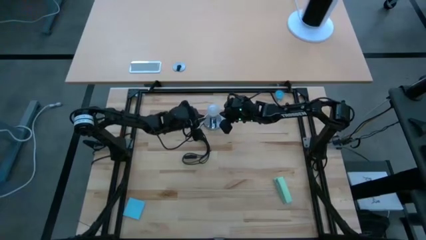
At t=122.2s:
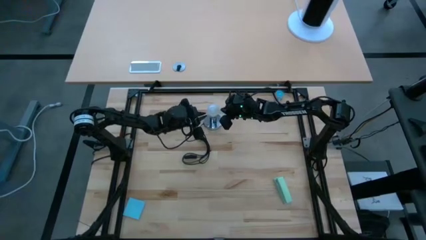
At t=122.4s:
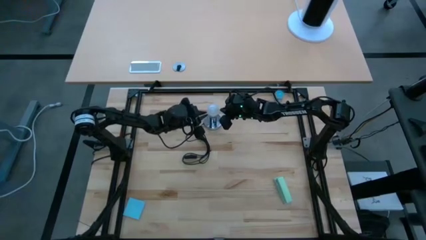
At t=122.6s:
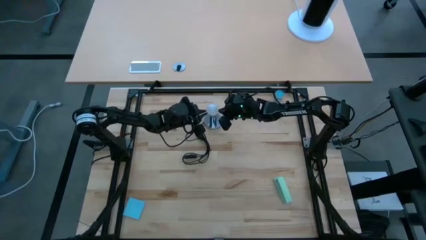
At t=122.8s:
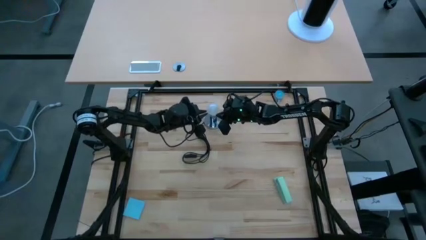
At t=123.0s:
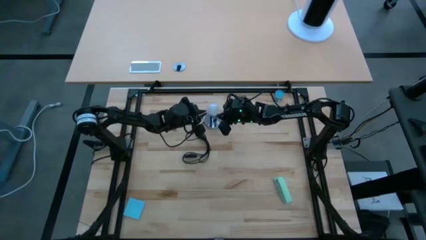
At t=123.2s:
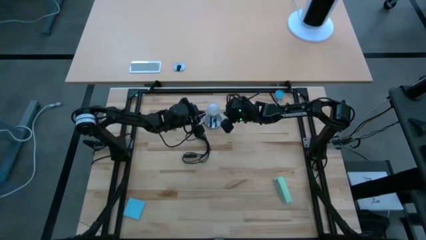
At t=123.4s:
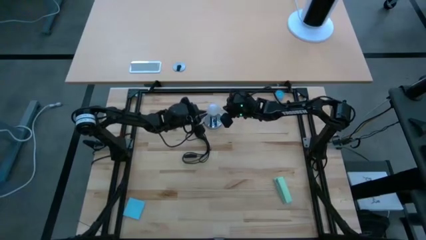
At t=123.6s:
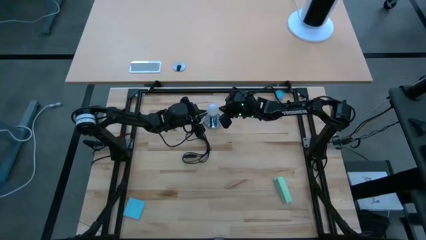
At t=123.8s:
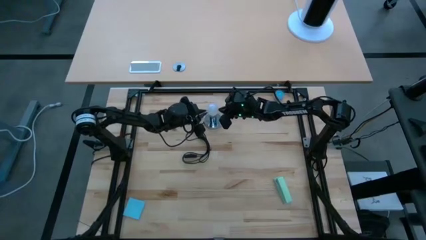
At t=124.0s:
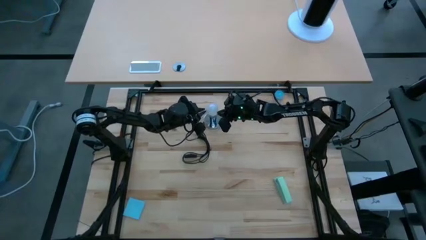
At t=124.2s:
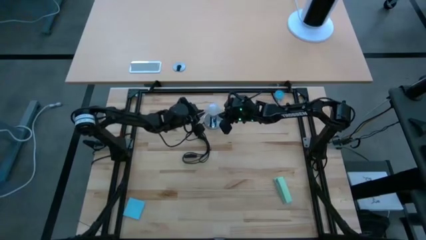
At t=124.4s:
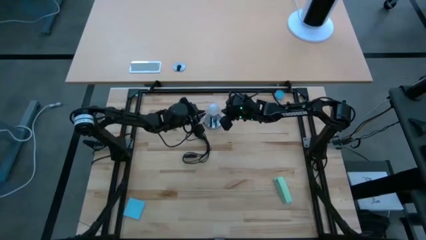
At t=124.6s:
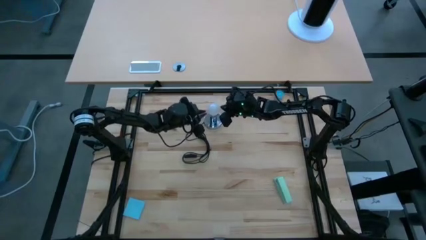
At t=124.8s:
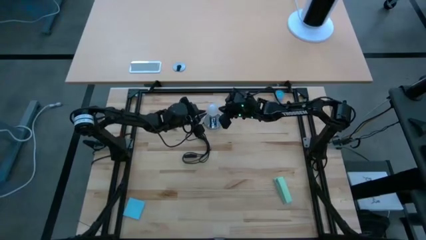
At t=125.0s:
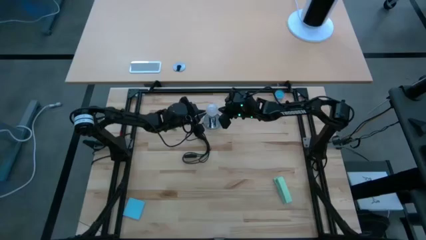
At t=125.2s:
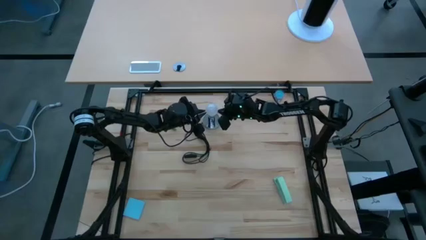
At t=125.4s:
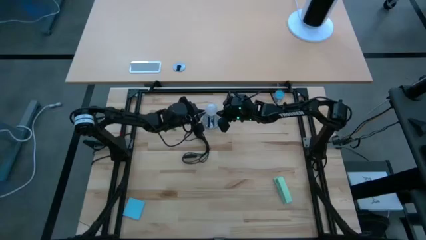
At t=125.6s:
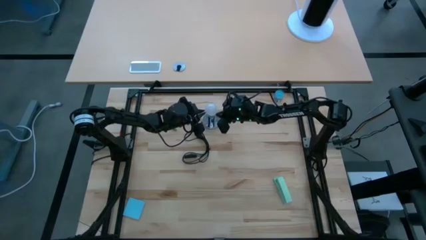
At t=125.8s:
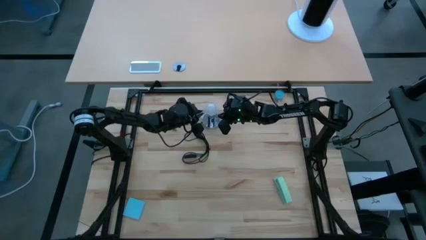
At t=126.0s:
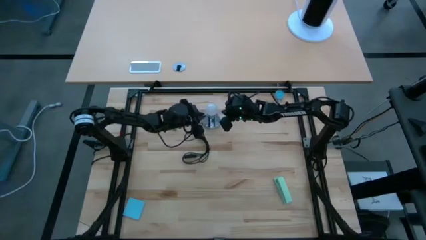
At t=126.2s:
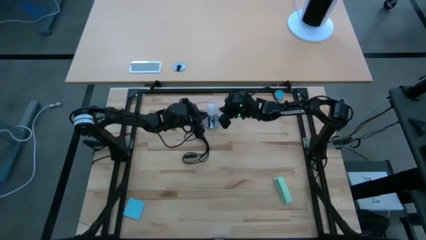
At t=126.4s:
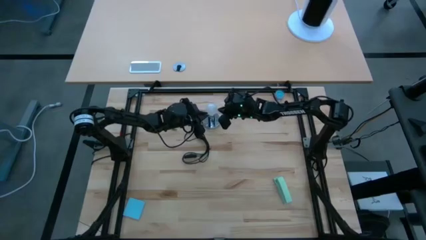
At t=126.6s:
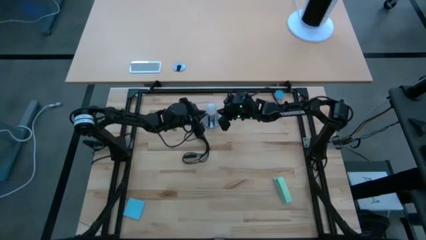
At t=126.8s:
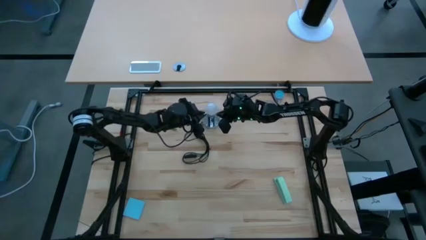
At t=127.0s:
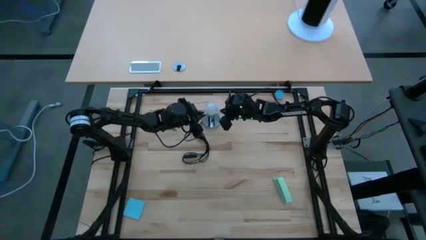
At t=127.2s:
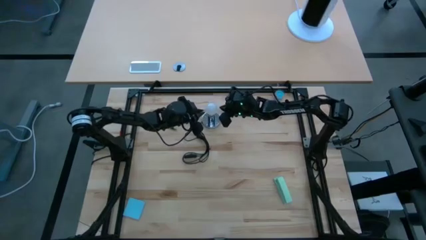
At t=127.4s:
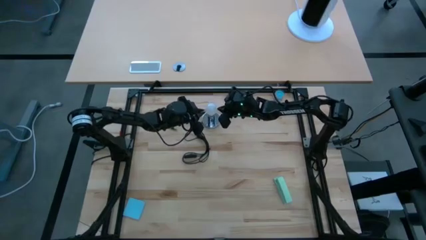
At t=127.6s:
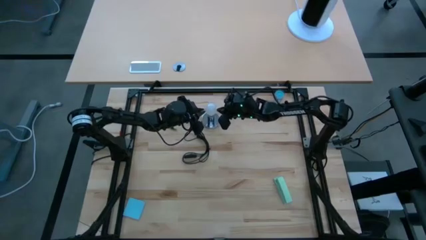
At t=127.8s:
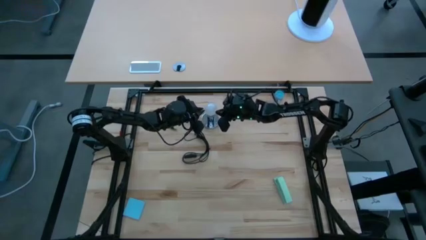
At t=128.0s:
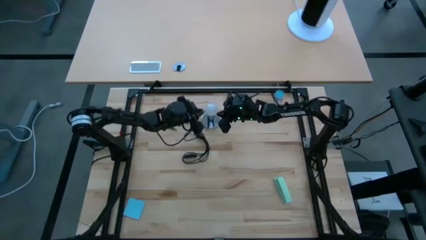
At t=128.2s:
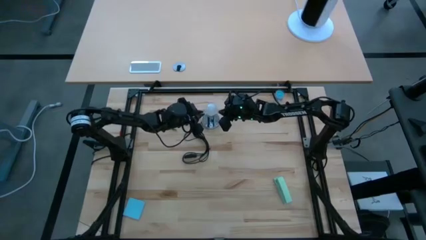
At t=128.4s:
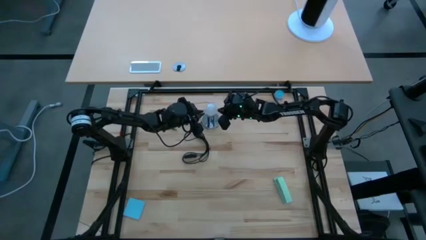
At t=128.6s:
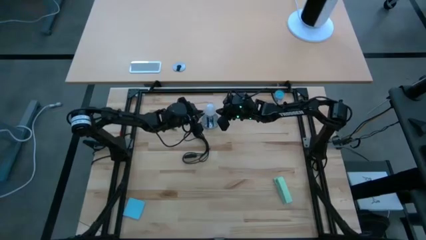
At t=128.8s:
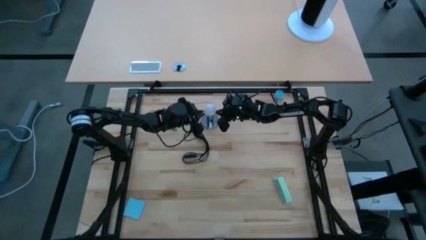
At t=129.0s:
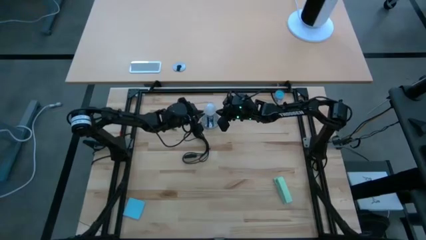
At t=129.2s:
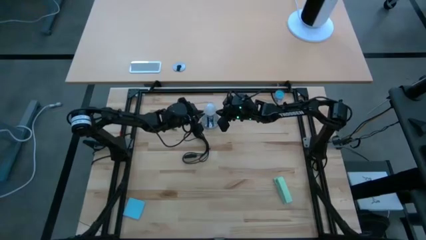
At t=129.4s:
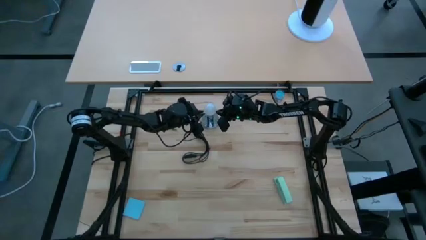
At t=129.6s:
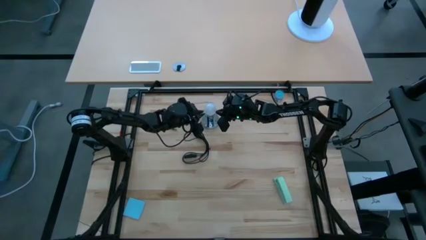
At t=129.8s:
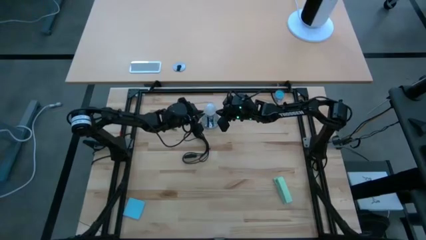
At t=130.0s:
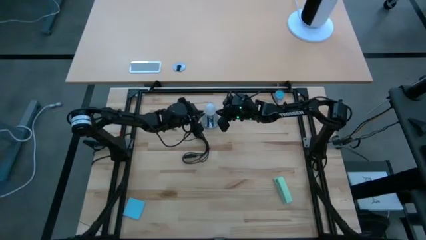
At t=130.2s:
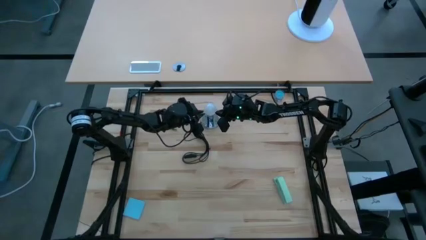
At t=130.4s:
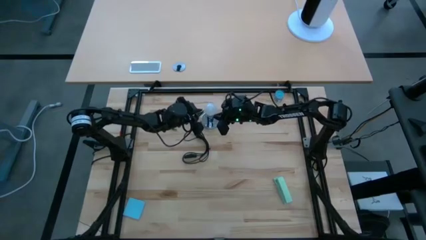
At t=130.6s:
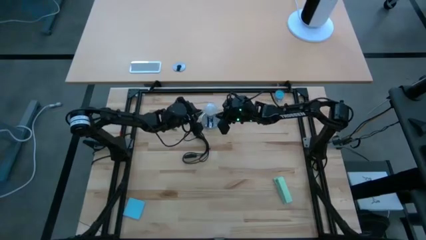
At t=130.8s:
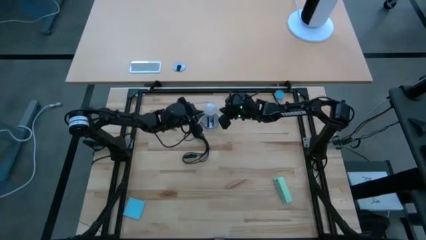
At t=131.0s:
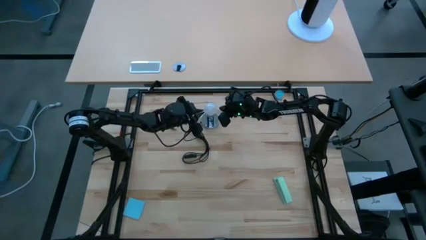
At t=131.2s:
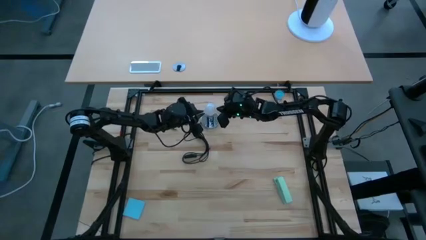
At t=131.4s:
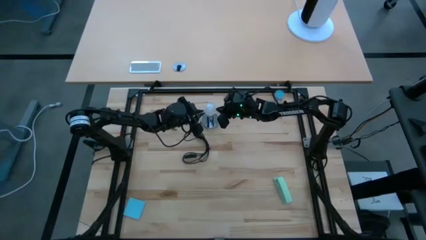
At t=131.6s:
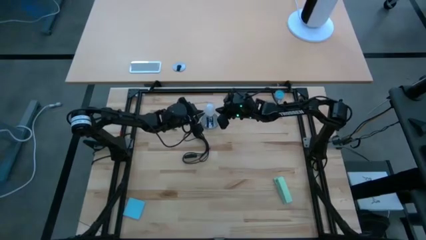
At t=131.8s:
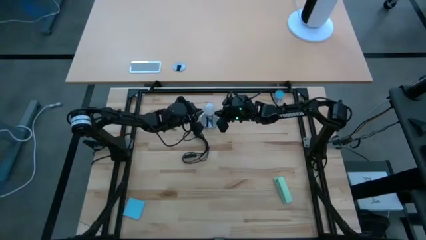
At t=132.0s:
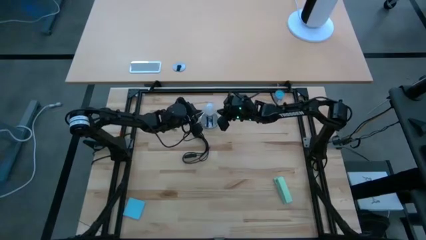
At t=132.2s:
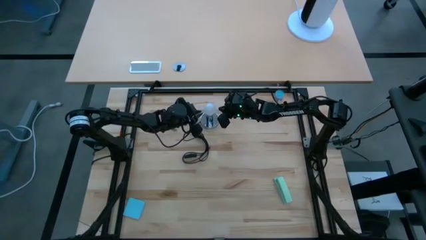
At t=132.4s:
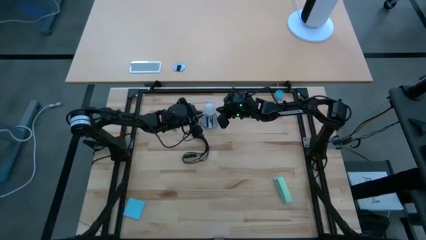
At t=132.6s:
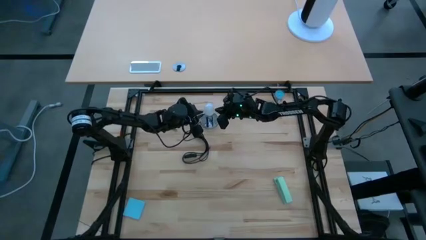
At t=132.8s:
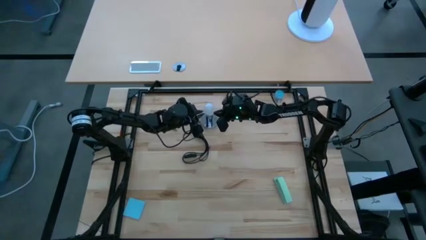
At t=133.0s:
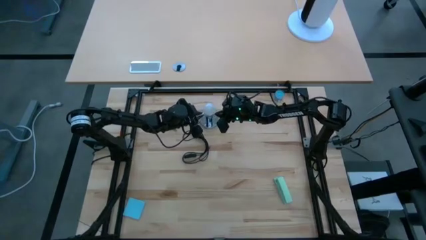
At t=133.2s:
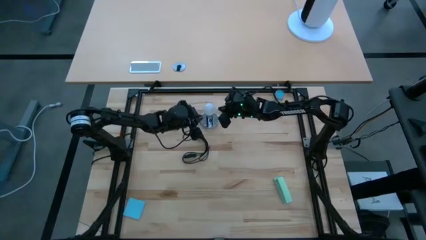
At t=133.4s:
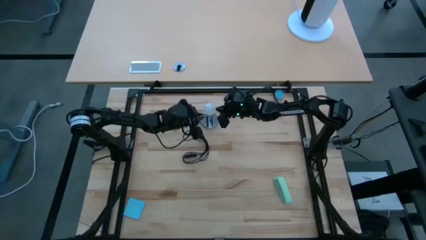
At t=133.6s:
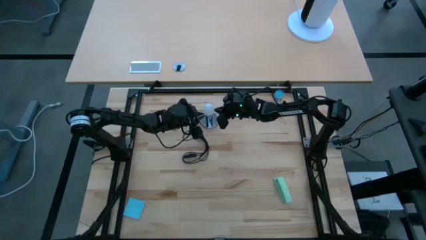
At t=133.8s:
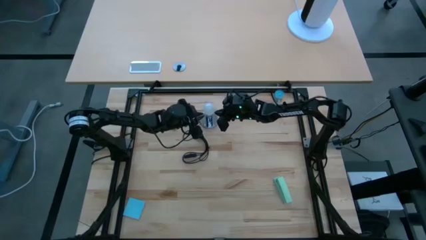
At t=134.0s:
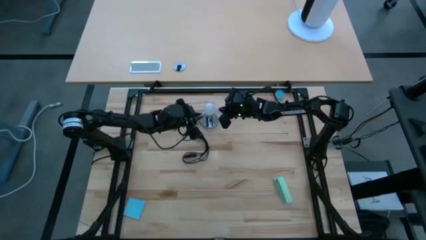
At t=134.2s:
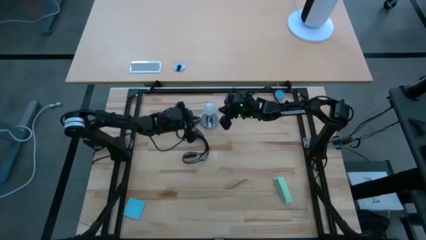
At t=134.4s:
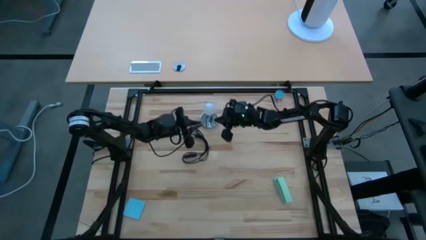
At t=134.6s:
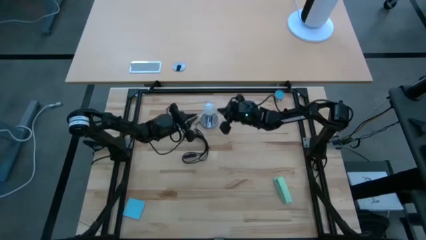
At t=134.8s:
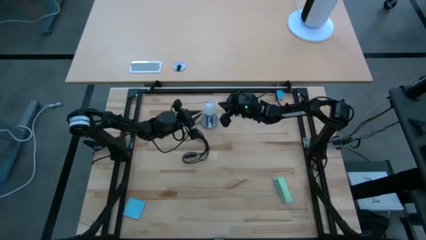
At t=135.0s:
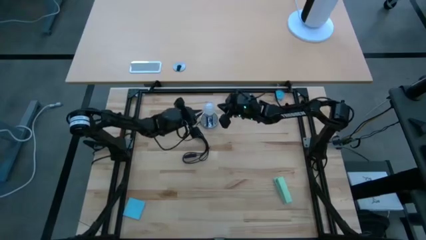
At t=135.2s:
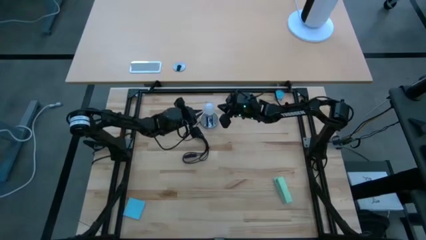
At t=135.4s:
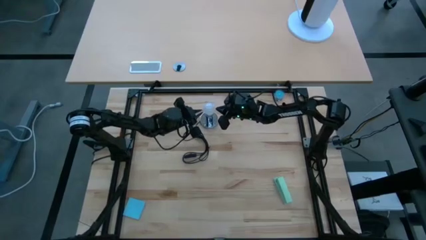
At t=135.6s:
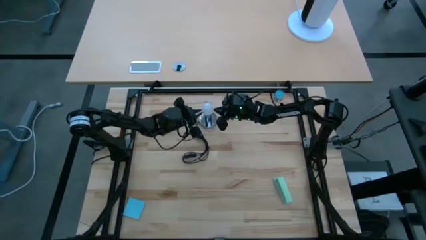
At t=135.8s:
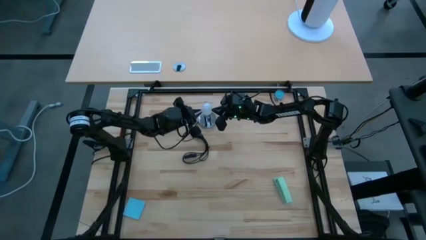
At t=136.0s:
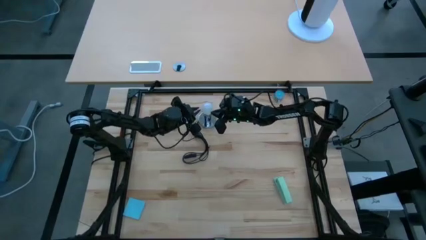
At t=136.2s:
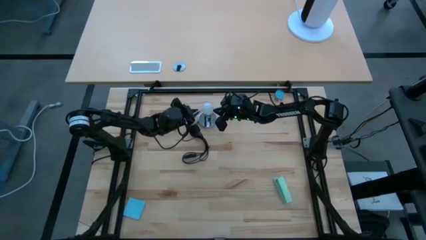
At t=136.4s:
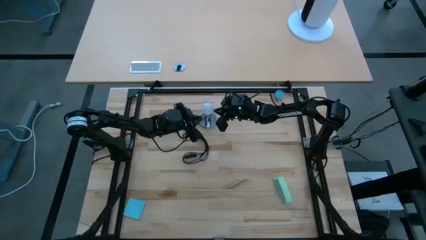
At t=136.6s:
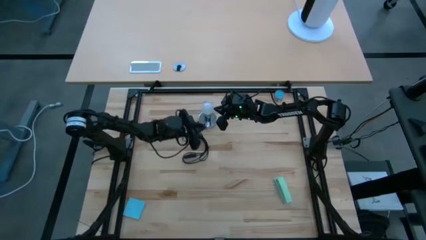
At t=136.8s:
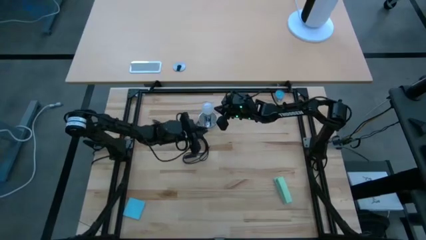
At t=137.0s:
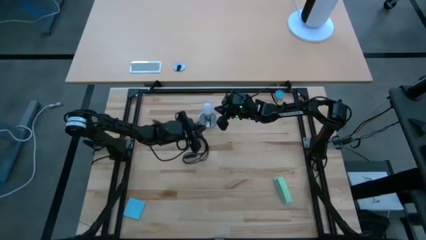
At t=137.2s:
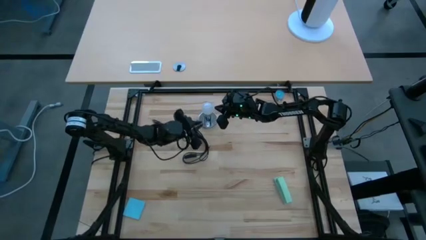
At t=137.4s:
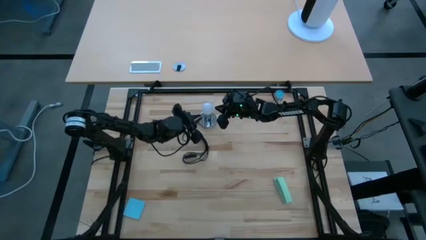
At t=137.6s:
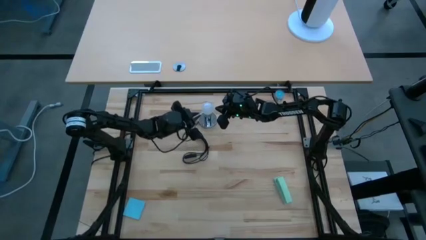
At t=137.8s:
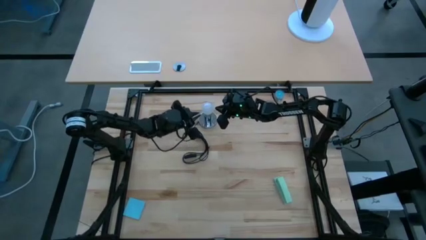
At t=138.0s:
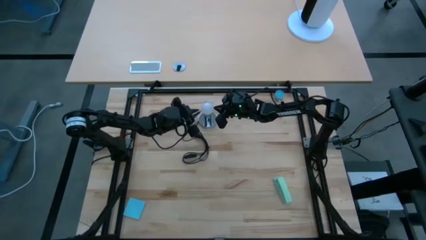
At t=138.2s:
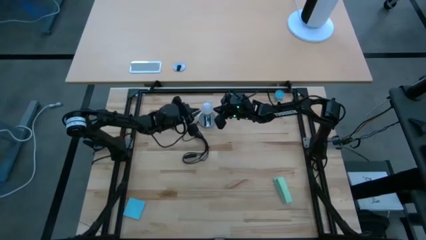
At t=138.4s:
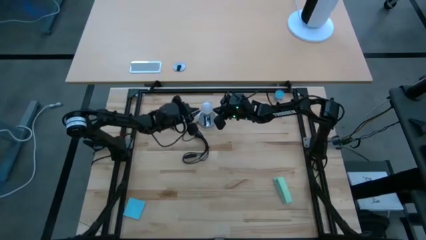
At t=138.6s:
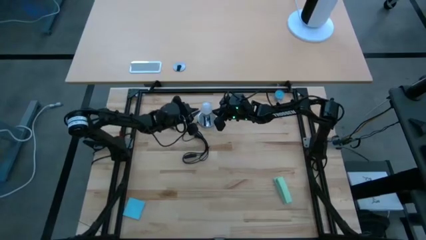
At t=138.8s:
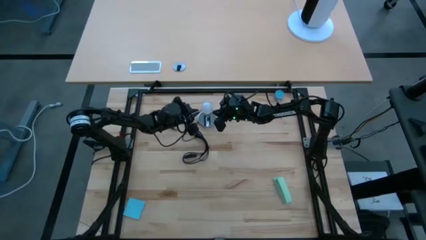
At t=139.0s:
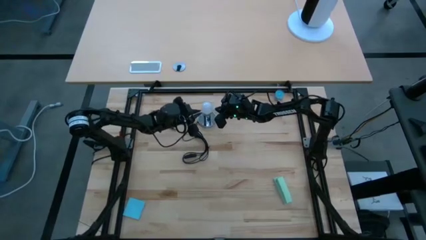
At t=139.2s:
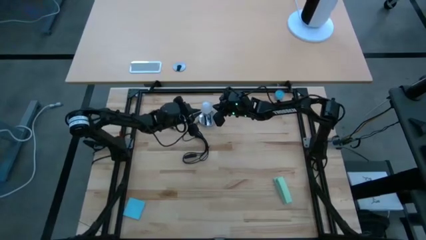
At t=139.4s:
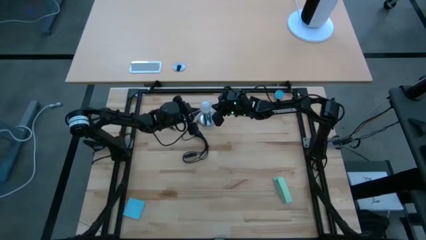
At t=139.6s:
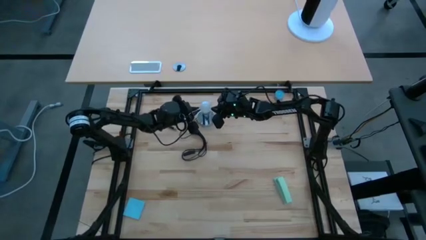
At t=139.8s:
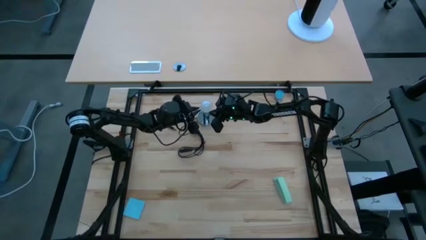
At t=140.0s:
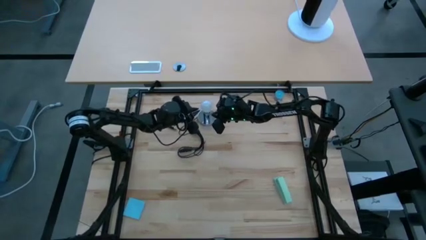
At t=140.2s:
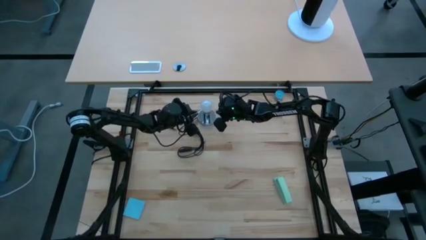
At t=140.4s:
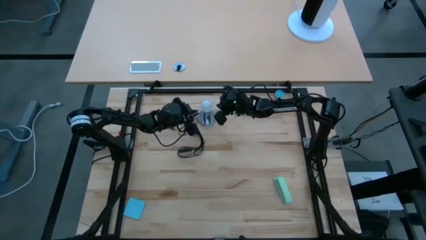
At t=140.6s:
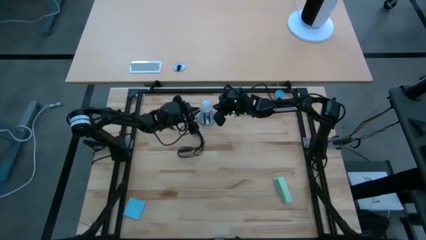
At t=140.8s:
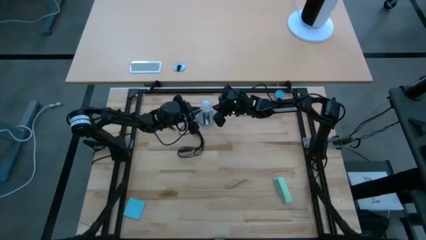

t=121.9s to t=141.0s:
Task: Screw lightbulb
Insert the lightbulb into the lamp
